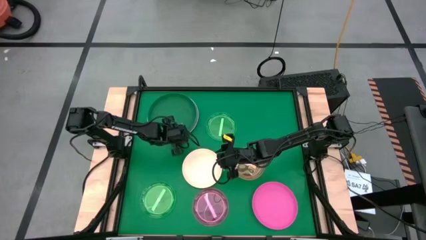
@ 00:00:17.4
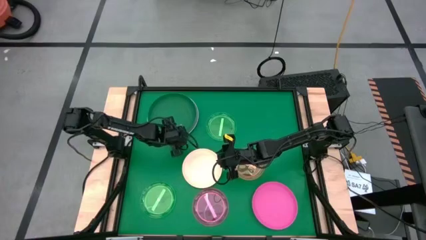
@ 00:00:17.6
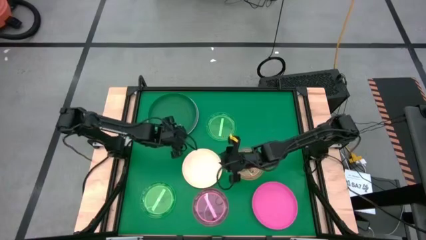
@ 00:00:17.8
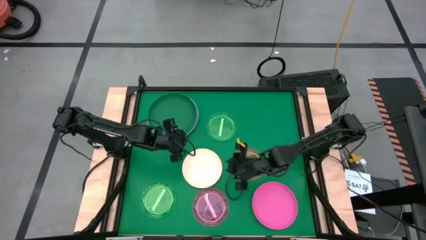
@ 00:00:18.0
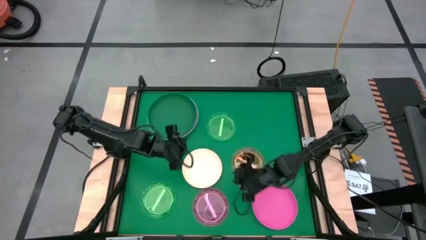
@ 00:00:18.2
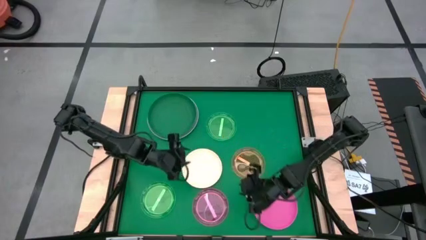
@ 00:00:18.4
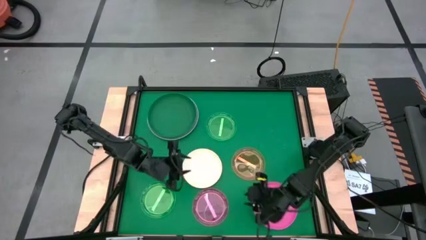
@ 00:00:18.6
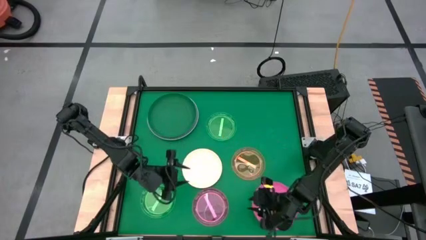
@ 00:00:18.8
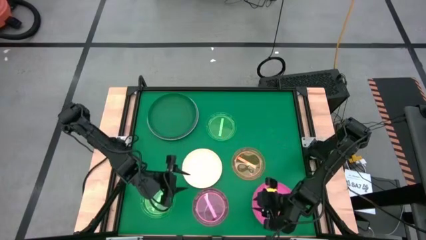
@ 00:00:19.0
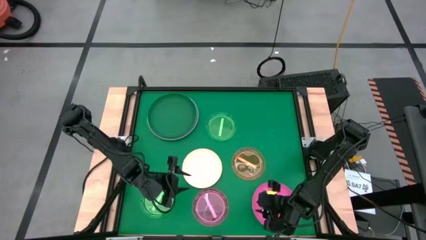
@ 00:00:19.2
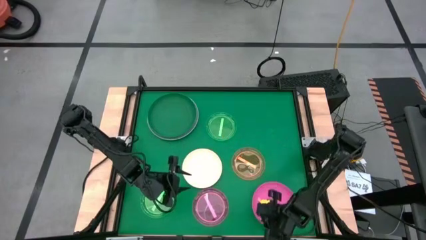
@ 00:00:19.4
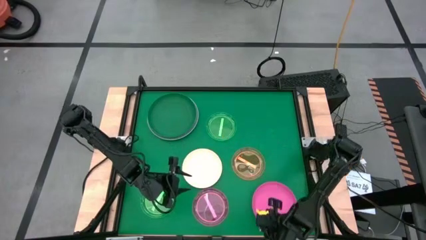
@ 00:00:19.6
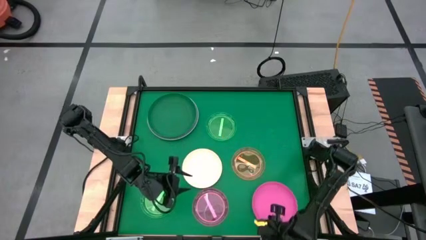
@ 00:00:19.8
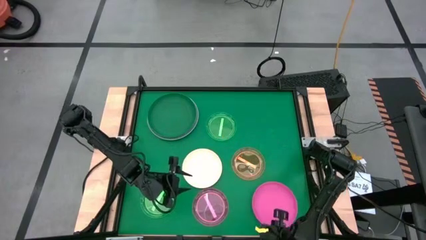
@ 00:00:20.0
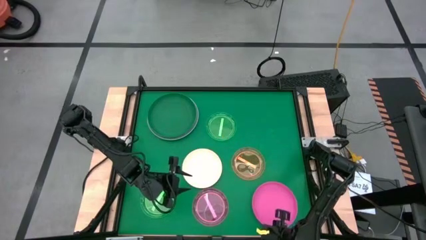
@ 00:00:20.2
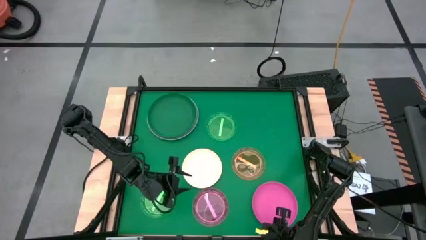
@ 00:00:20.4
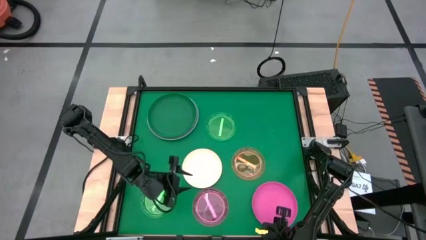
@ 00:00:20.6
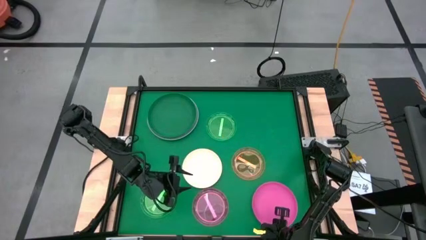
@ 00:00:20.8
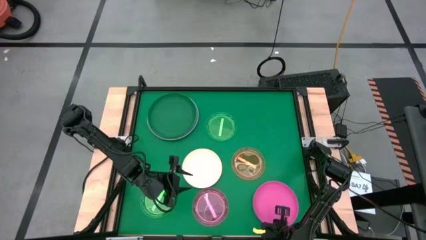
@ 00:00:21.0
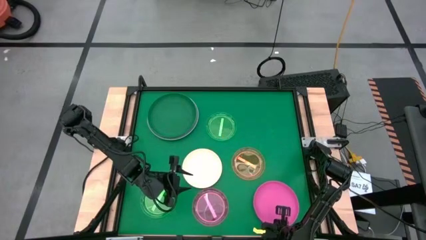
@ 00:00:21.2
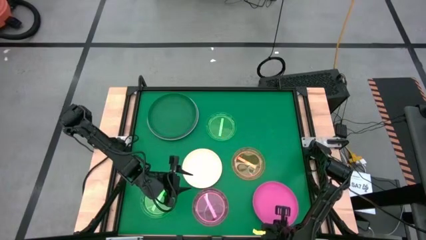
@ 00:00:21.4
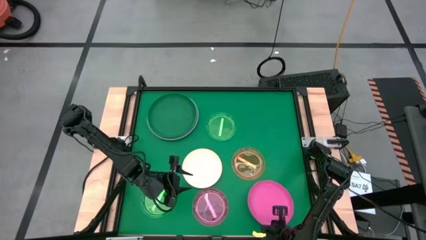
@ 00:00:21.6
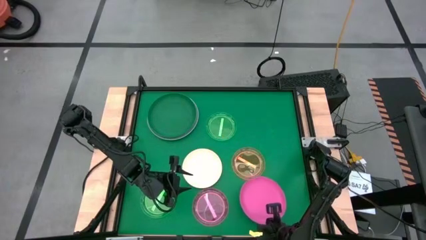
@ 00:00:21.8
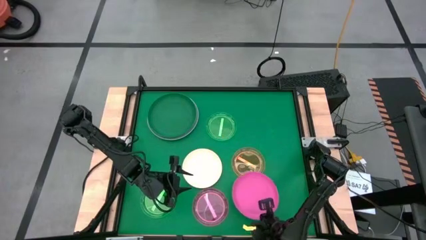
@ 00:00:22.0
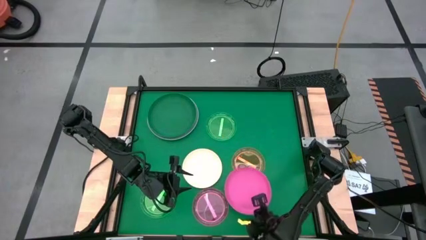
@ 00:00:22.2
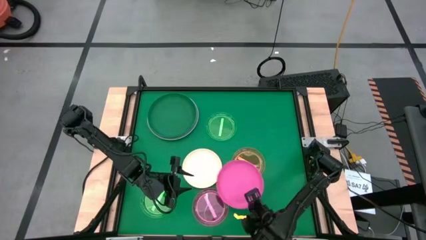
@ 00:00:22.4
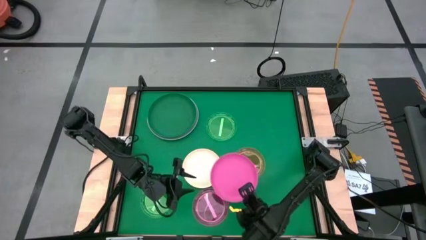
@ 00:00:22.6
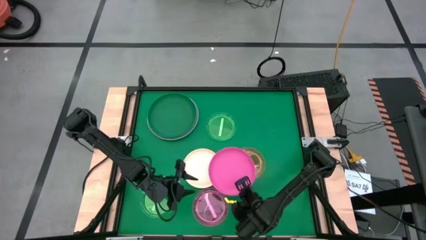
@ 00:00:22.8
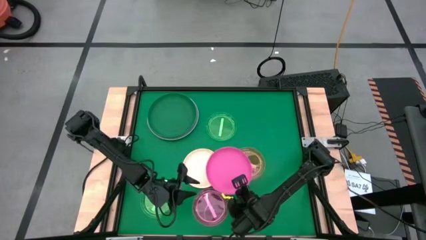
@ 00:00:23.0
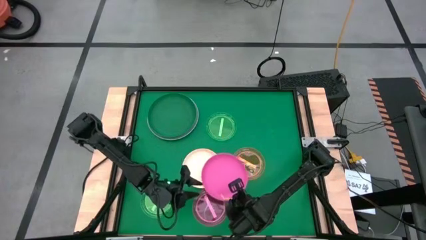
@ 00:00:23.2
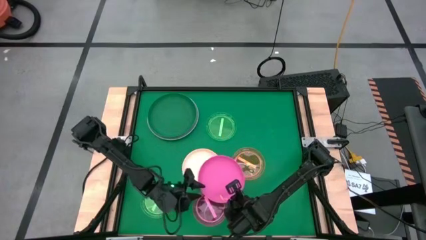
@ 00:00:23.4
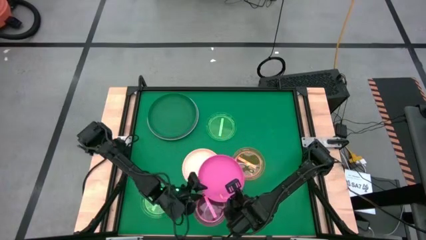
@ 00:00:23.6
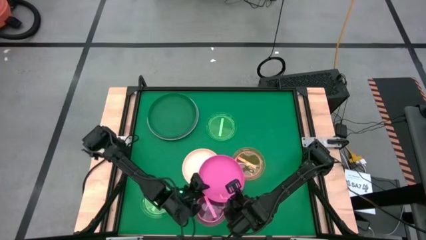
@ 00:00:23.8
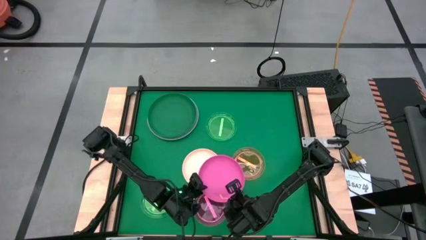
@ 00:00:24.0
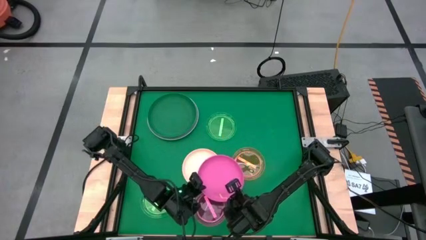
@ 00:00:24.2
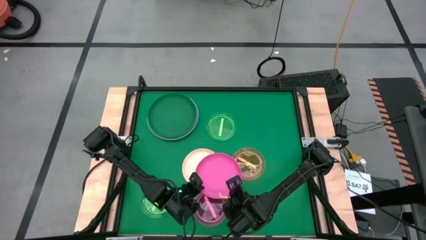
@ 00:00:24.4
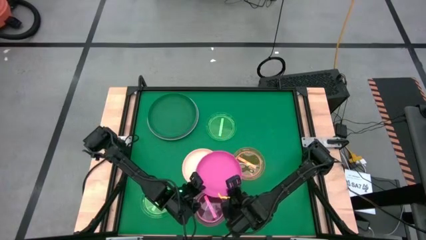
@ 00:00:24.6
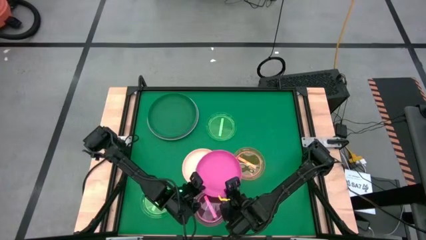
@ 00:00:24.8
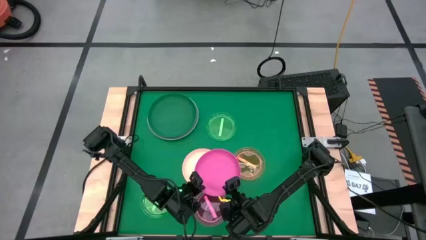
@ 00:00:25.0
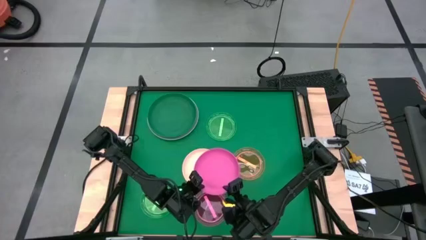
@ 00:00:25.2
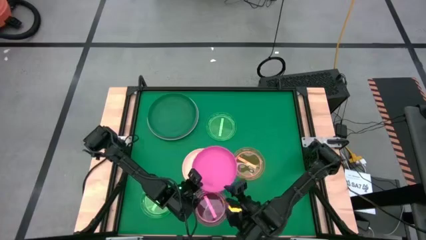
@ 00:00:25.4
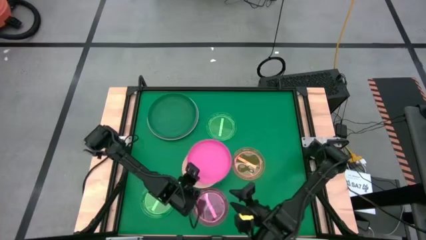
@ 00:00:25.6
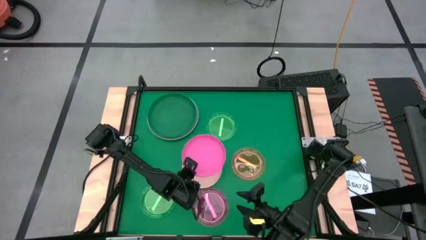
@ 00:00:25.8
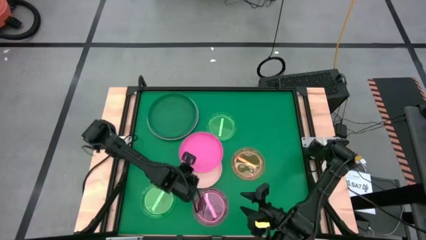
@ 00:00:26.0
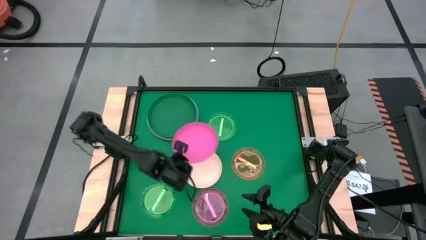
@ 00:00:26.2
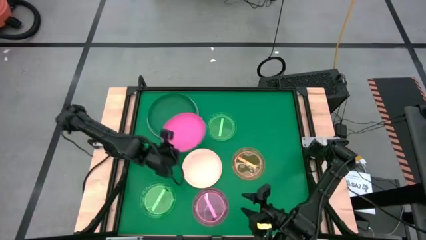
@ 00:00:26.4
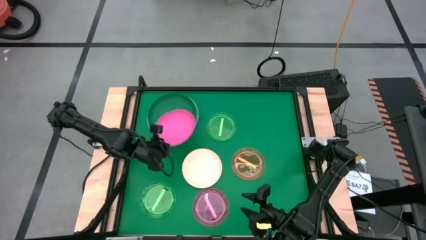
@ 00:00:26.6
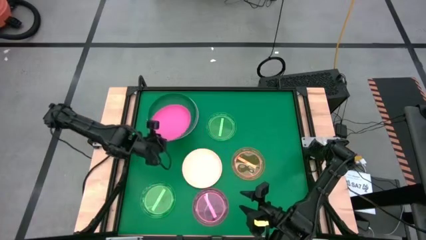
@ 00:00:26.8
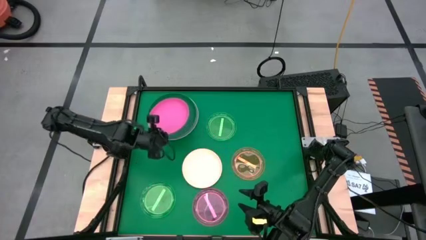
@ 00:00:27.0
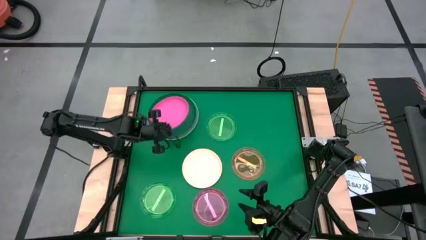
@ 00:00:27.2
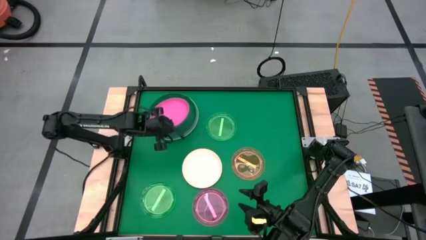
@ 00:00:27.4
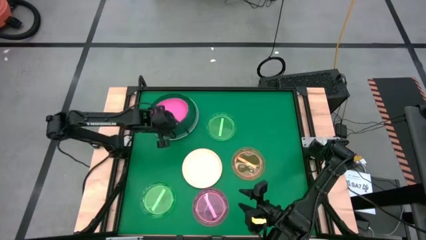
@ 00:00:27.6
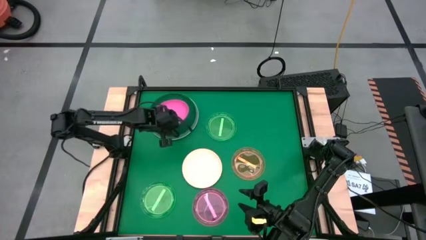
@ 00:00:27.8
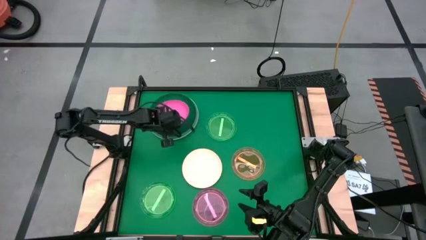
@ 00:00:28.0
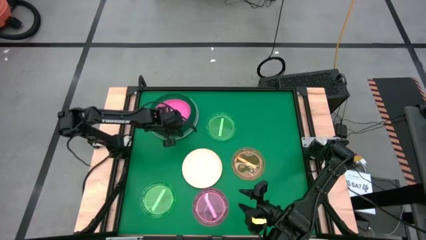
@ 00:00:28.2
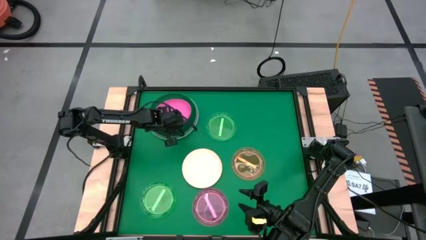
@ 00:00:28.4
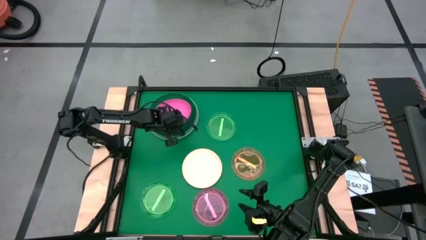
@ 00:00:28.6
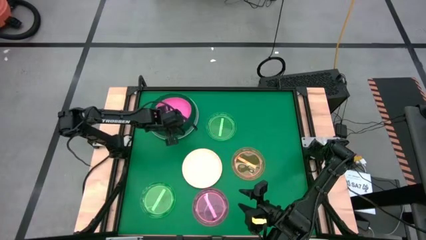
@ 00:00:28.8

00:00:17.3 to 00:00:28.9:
Task: Stack plastic plates
Stack the pink plate on the dark green plate
